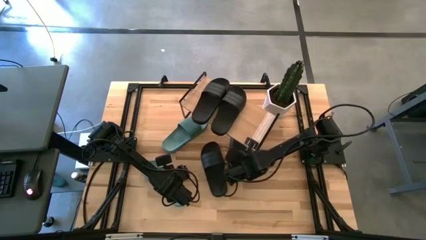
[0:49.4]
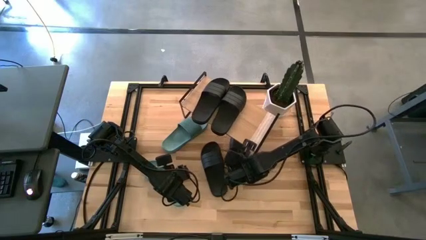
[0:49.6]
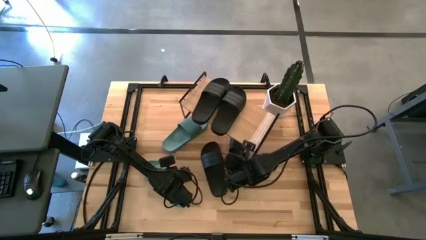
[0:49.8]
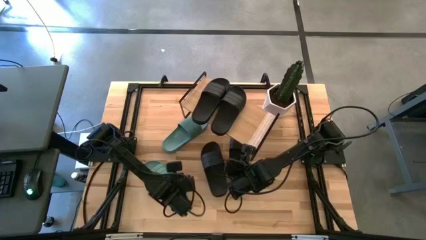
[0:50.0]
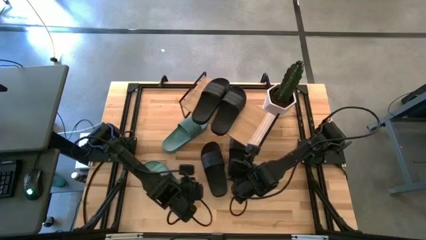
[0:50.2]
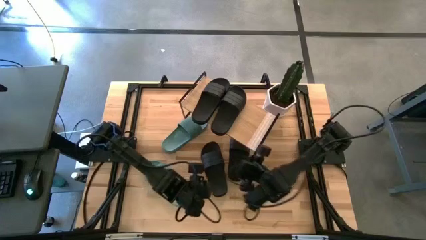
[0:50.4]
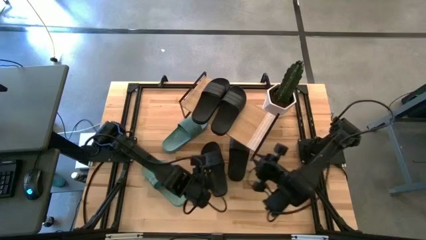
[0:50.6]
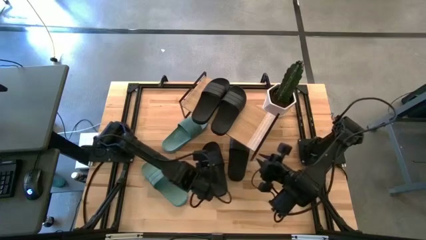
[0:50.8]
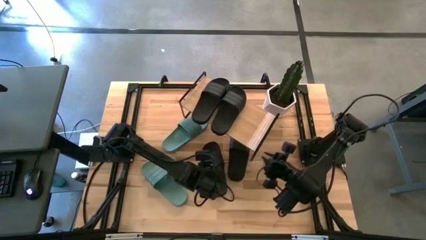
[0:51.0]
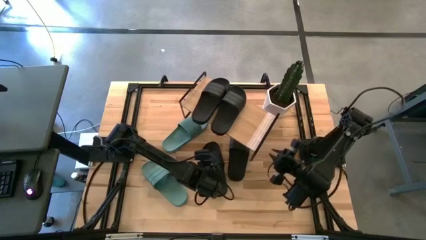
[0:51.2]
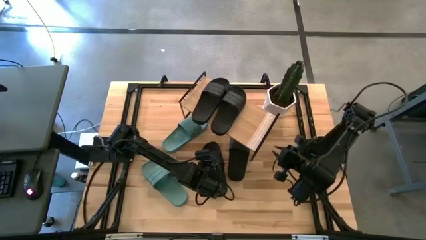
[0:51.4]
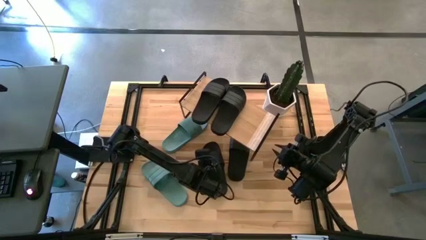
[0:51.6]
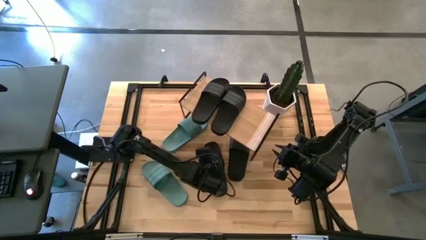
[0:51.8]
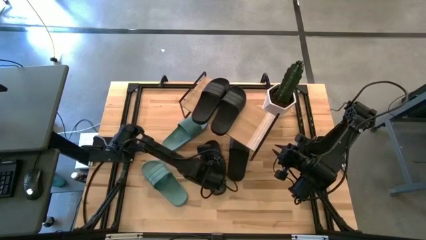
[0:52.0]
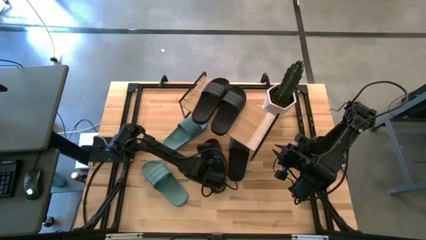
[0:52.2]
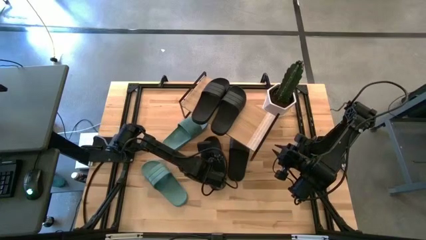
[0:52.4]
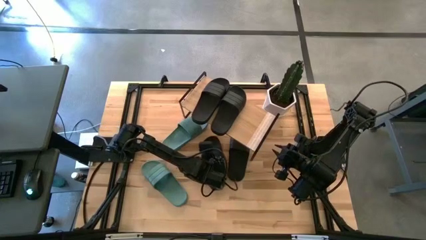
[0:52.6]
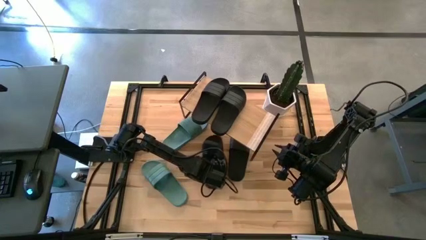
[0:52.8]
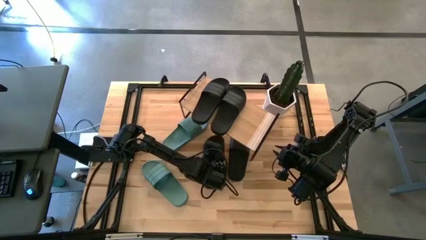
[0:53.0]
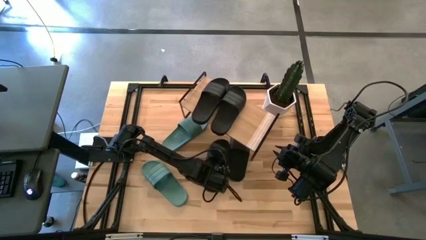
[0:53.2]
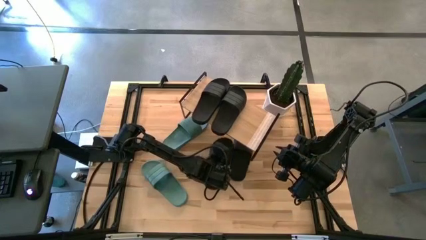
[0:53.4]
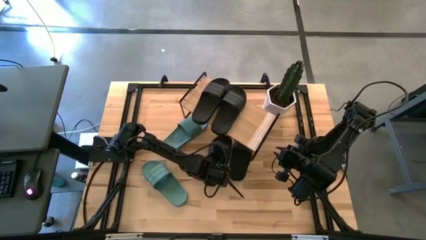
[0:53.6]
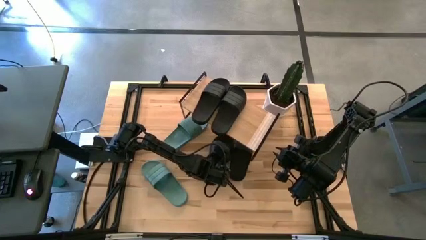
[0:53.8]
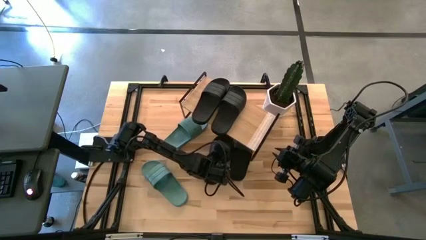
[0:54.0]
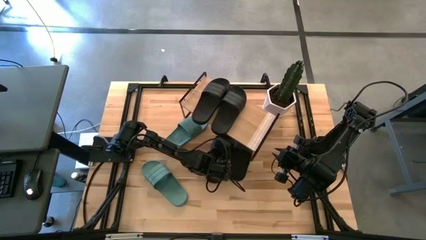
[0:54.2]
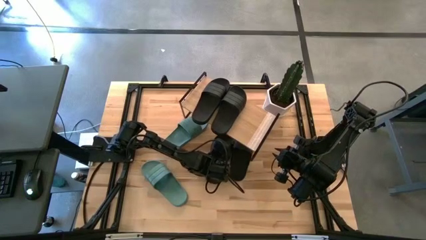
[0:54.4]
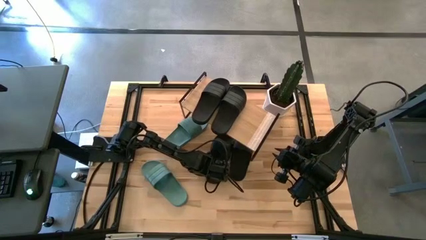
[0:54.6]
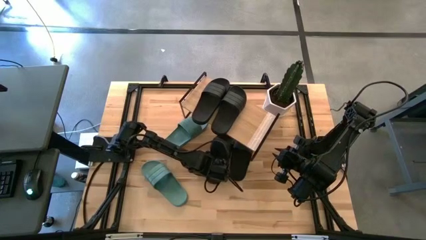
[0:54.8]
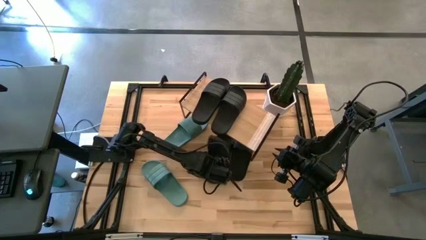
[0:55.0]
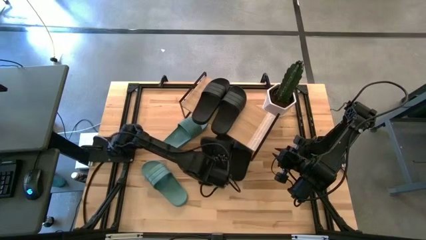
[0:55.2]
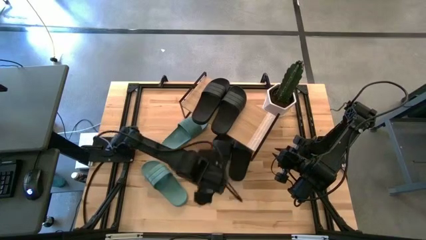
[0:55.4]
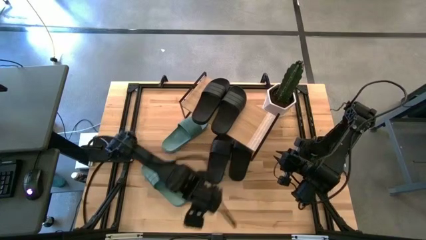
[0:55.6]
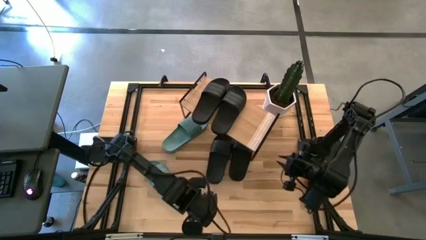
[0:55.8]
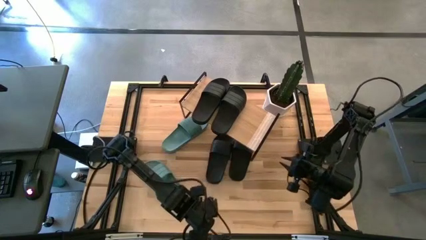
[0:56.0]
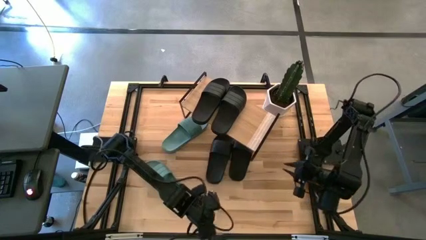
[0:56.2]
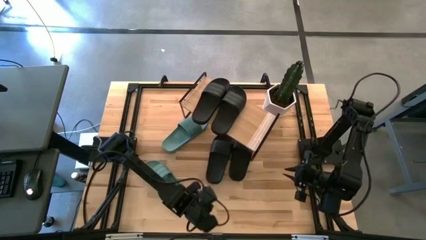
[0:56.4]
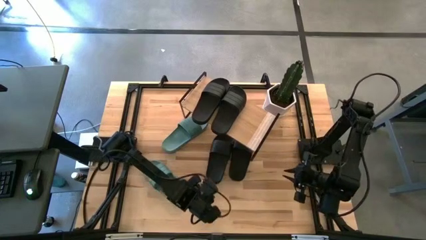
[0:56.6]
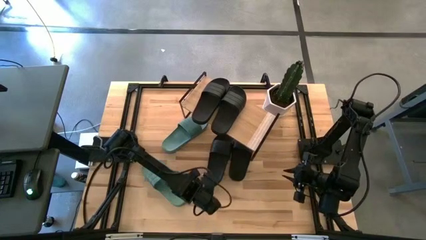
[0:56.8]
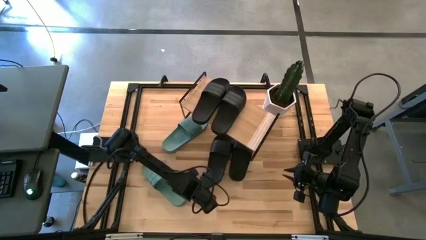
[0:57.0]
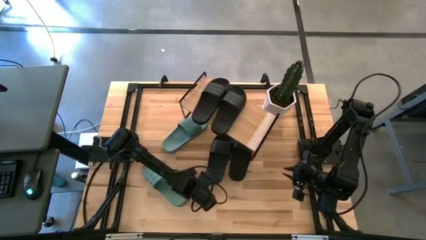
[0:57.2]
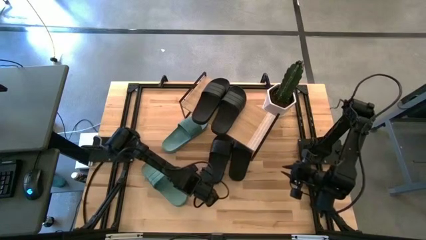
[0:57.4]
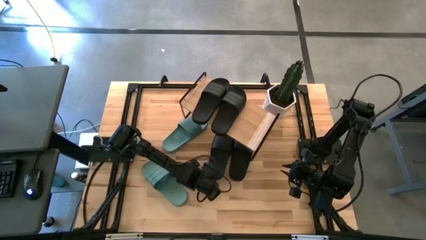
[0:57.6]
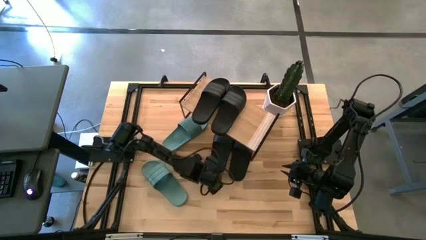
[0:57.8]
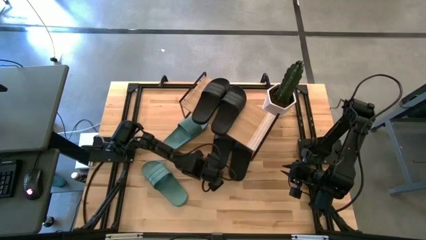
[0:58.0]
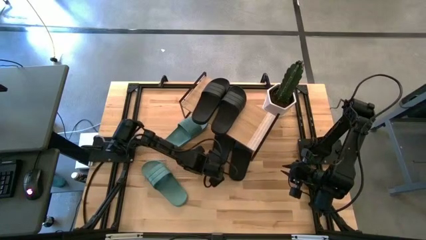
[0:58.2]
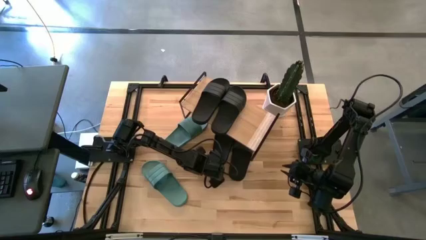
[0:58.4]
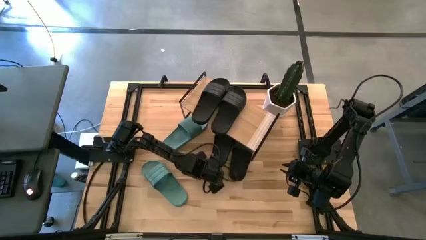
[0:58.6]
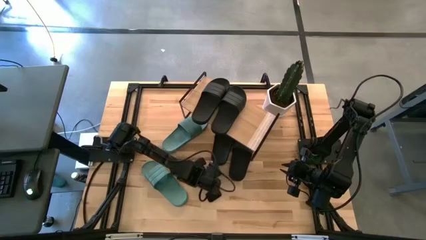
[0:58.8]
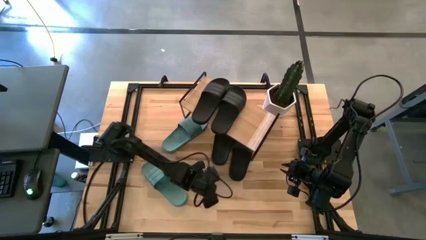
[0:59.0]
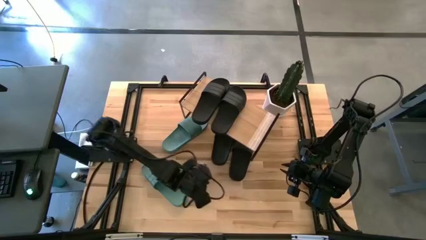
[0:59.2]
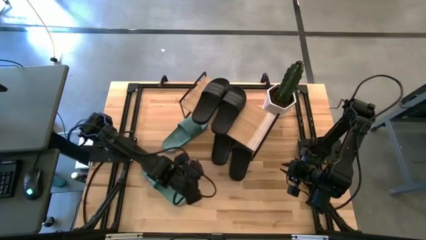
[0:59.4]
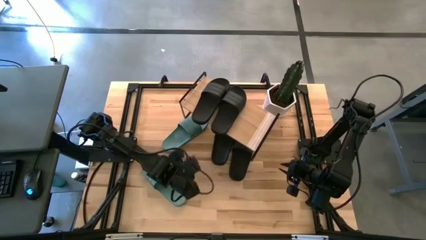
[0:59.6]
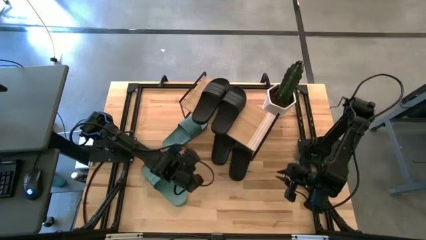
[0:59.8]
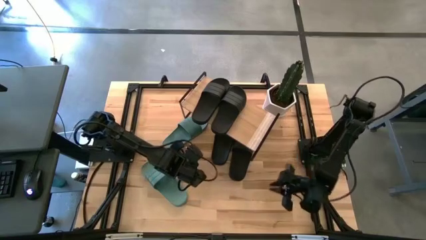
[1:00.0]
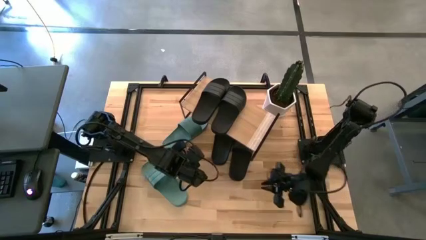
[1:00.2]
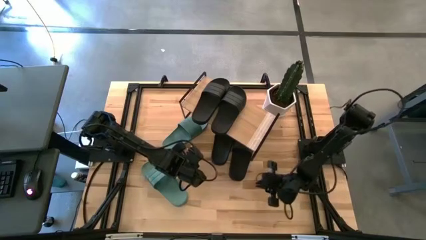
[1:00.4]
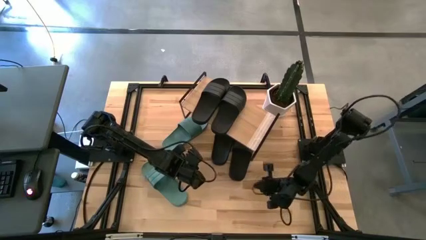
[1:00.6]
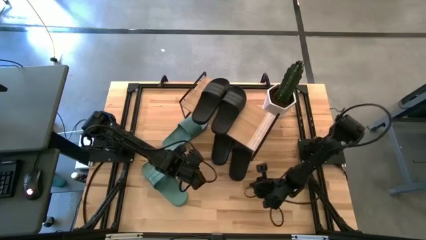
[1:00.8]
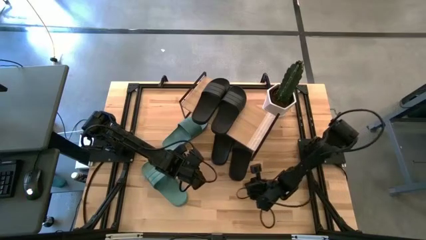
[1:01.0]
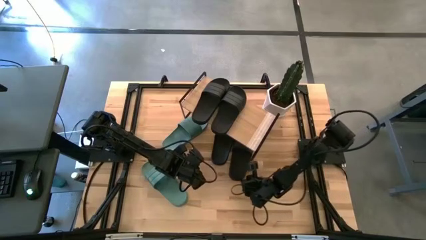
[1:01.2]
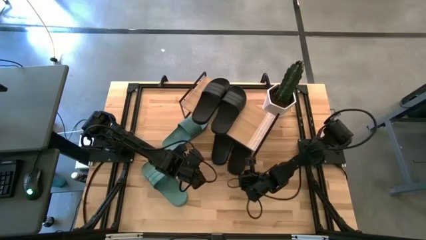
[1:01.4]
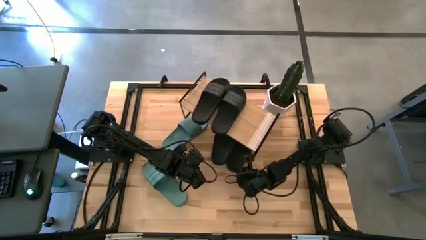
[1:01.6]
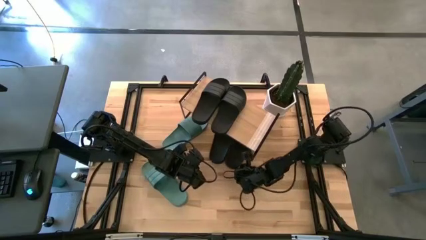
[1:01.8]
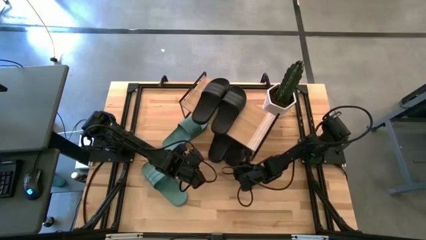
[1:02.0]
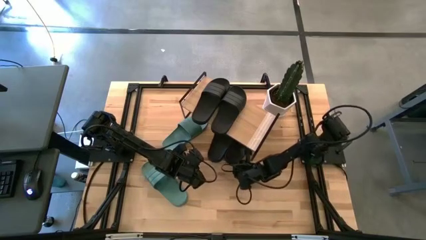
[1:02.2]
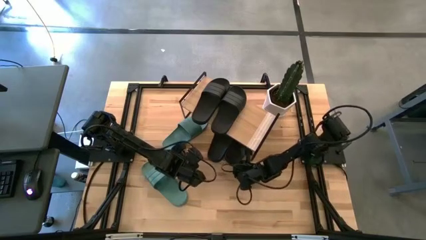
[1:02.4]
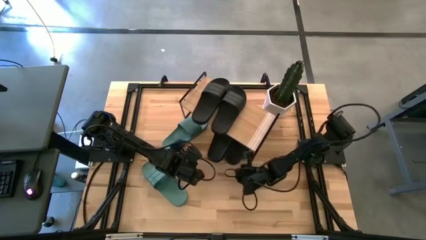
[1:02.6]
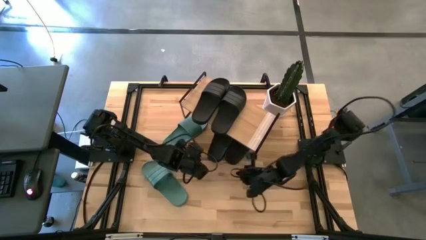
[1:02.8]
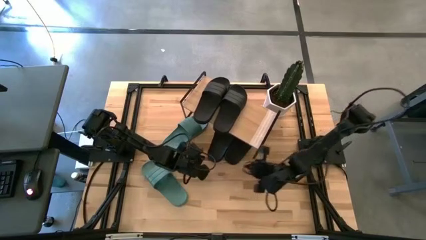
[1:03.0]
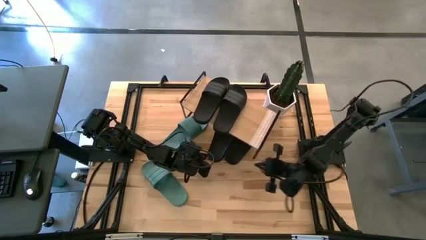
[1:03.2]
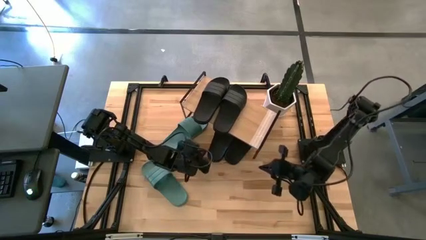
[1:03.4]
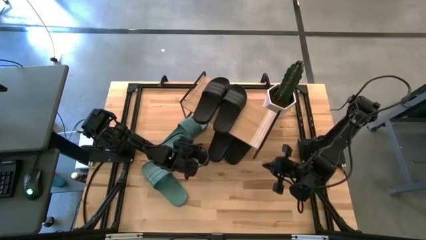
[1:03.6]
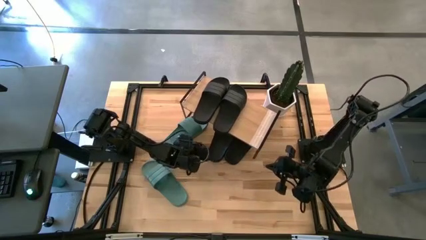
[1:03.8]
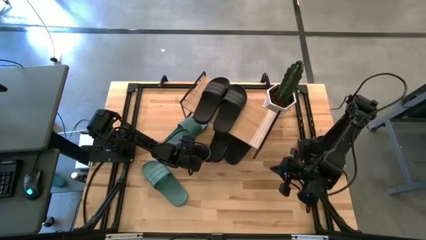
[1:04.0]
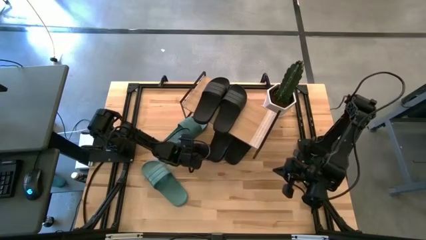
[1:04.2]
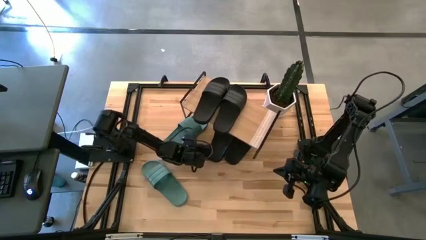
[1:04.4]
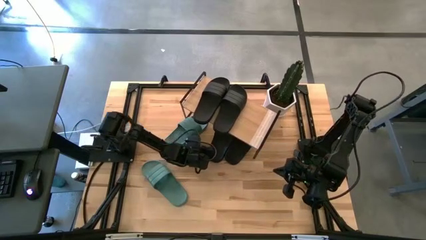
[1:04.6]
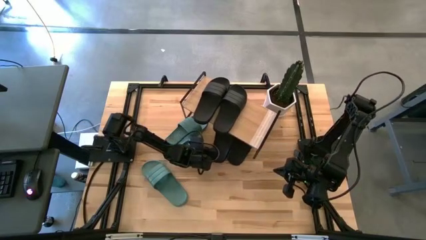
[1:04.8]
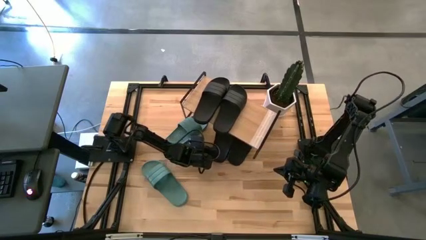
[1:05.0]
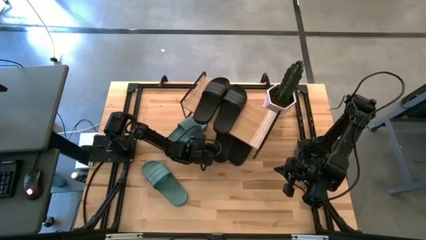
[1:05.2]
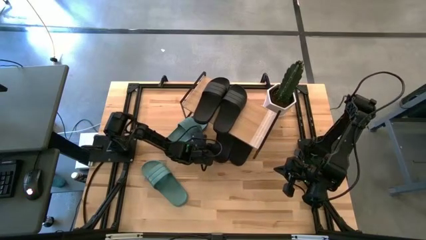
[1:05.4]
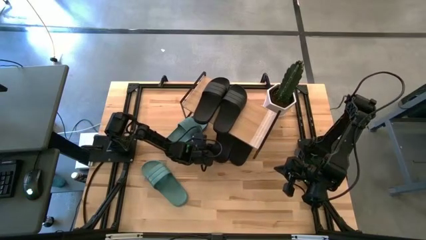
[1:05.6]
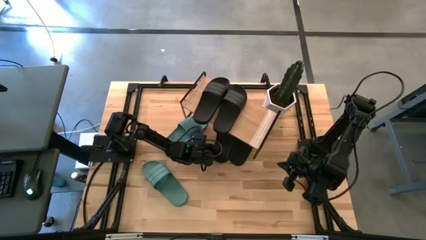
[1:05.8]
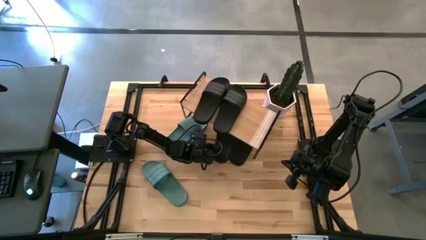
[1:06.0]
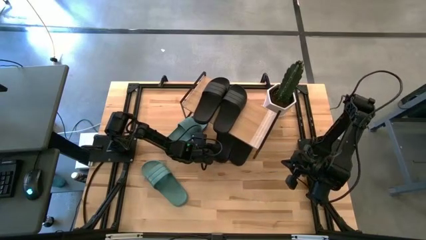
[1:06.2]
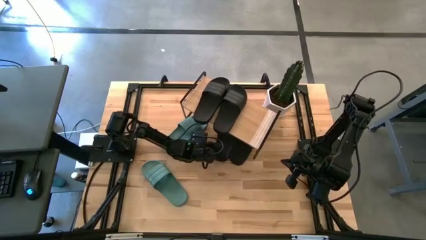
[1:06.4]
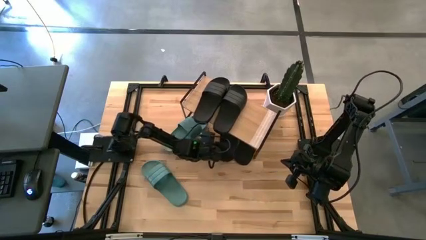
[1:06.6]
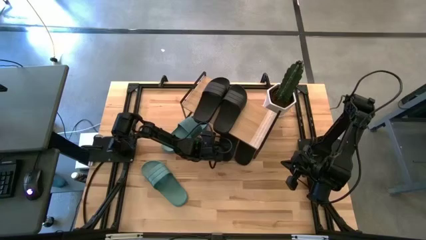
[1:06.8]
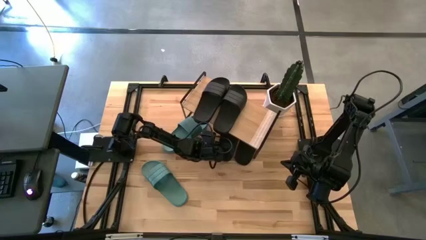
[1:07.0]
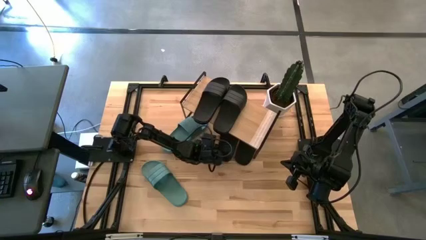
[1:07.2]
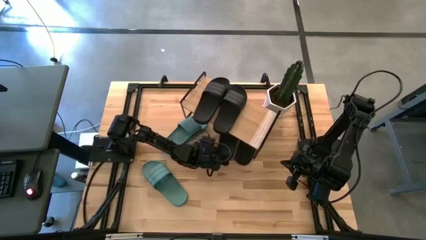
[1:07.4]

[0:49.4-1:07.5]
Task: Pick and place slides into the shelf
Move the black slide under the shelf
